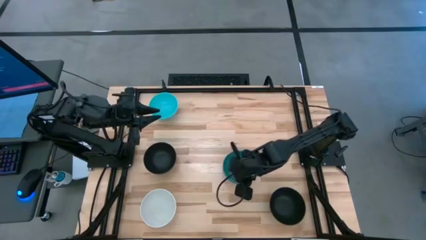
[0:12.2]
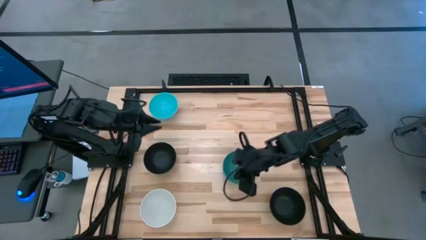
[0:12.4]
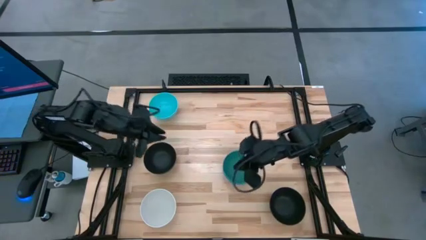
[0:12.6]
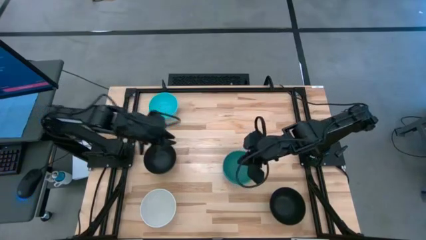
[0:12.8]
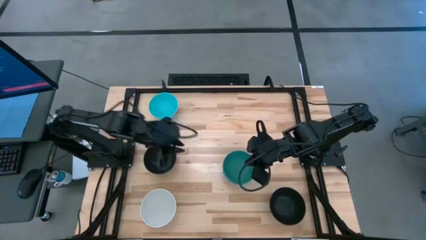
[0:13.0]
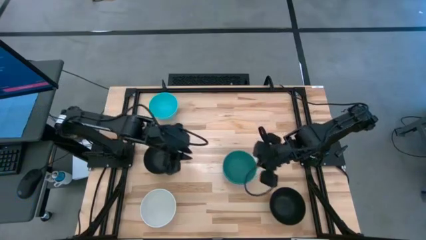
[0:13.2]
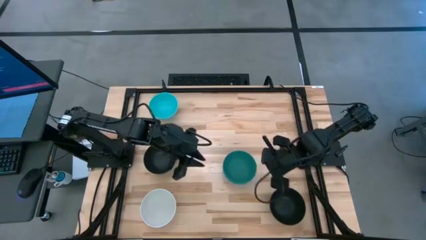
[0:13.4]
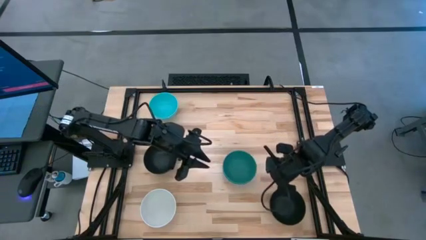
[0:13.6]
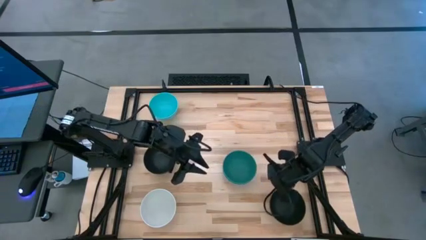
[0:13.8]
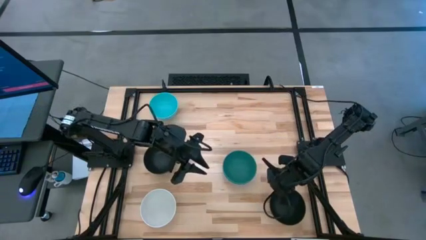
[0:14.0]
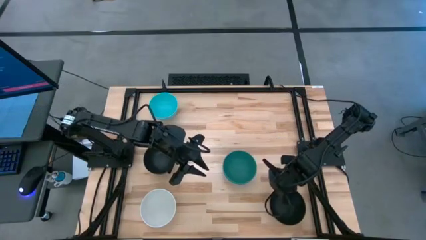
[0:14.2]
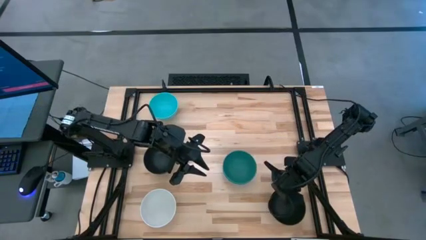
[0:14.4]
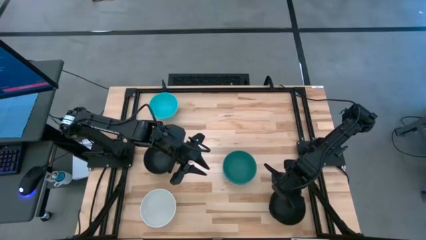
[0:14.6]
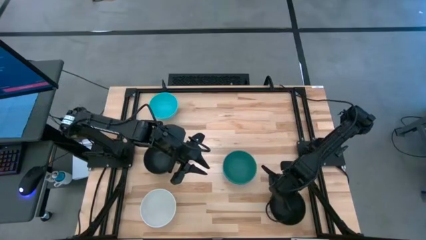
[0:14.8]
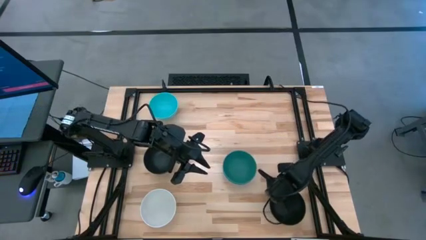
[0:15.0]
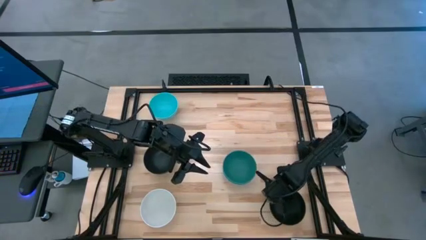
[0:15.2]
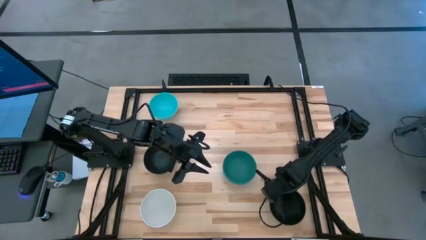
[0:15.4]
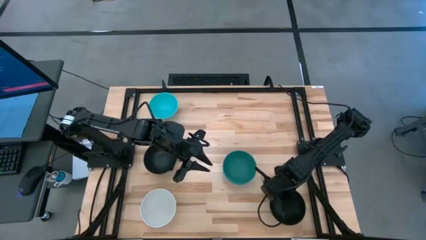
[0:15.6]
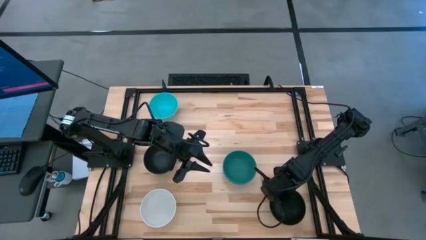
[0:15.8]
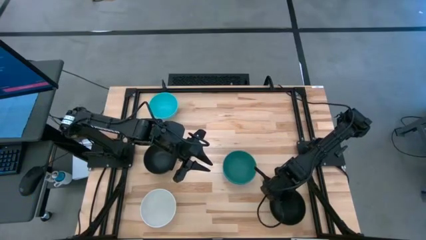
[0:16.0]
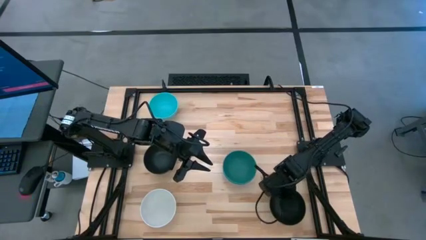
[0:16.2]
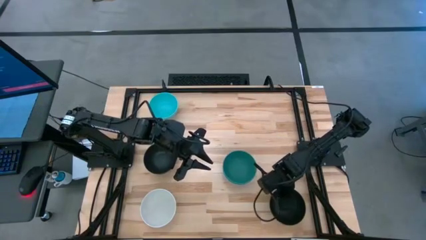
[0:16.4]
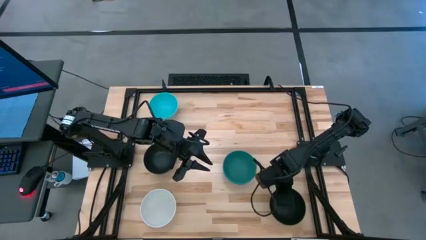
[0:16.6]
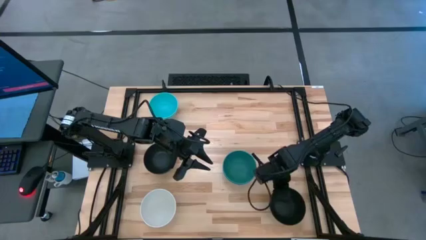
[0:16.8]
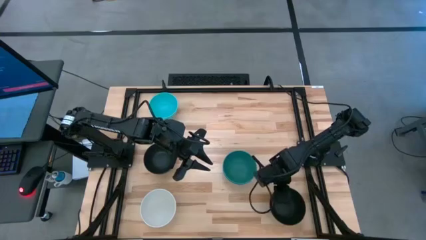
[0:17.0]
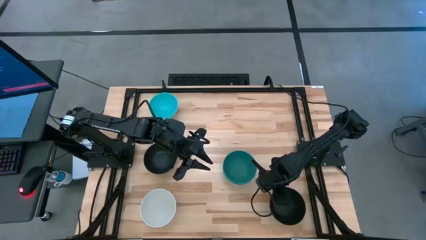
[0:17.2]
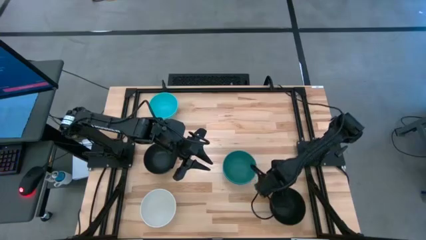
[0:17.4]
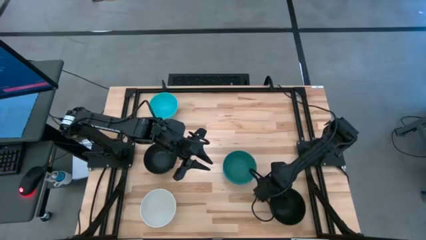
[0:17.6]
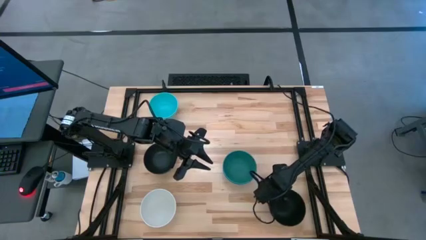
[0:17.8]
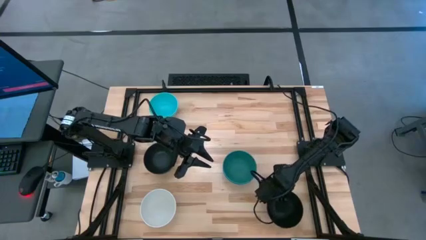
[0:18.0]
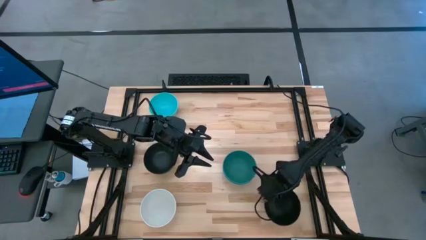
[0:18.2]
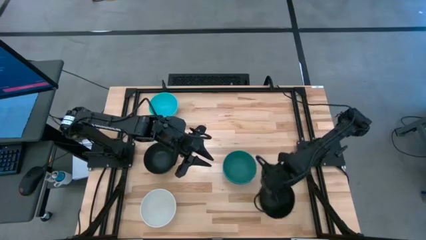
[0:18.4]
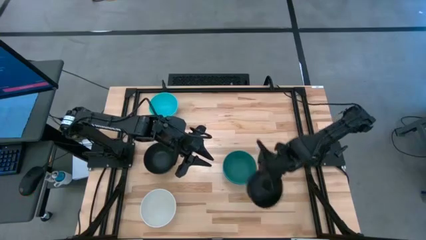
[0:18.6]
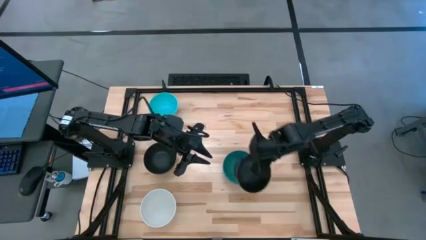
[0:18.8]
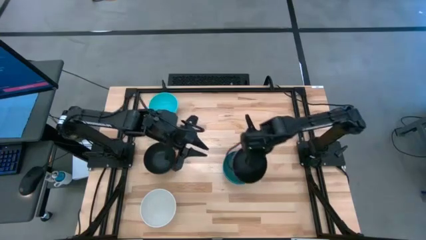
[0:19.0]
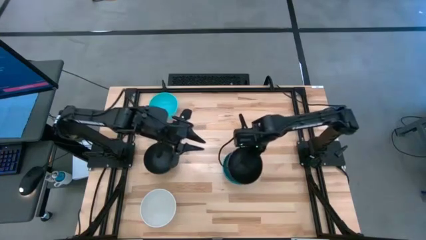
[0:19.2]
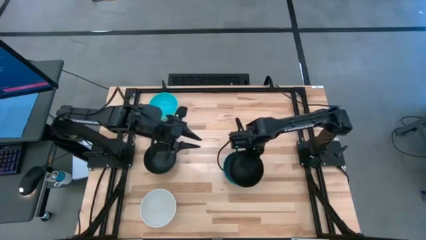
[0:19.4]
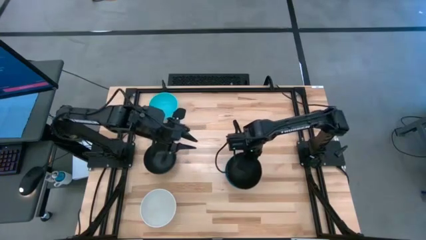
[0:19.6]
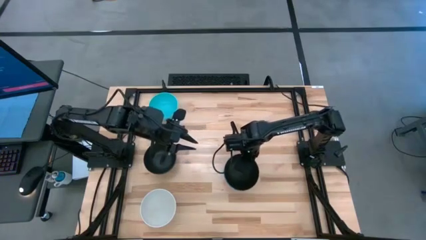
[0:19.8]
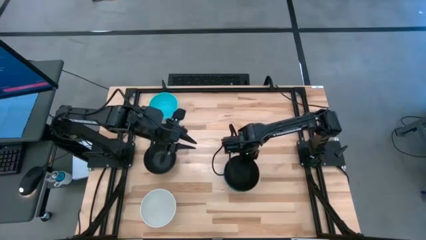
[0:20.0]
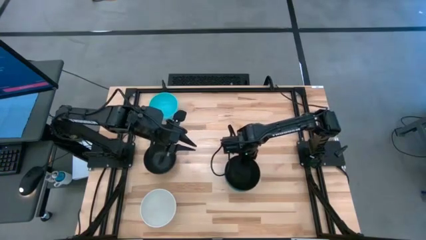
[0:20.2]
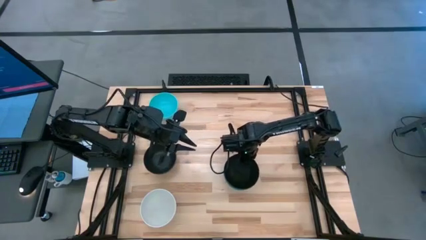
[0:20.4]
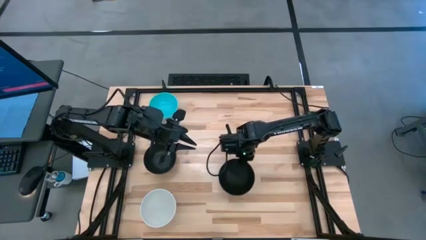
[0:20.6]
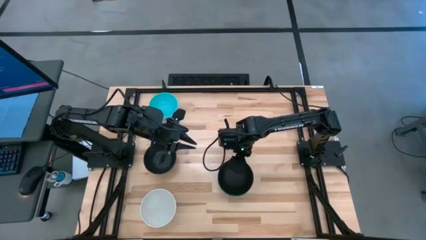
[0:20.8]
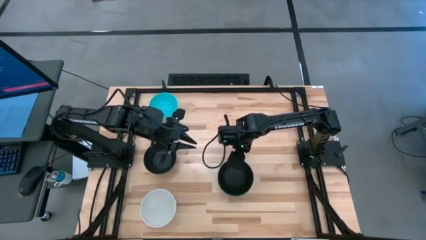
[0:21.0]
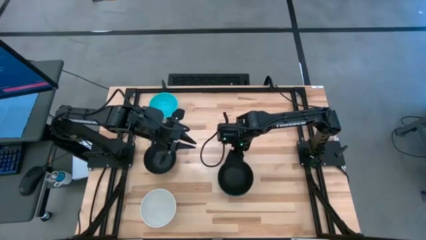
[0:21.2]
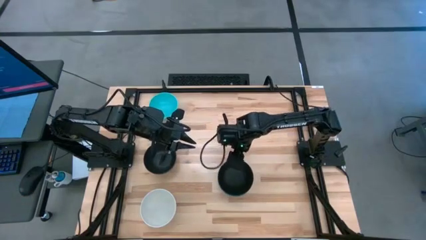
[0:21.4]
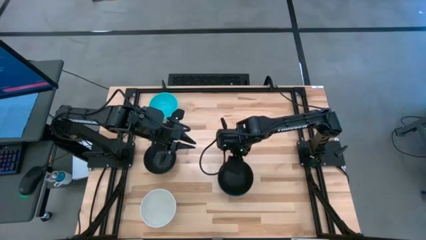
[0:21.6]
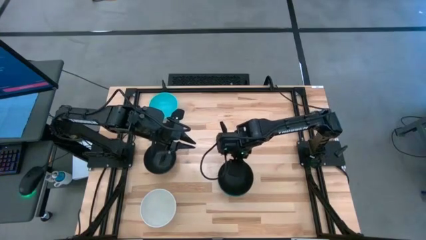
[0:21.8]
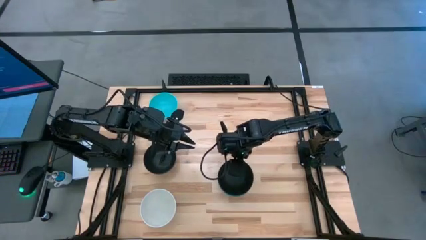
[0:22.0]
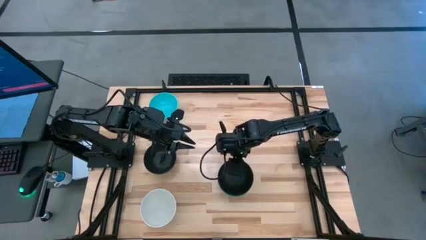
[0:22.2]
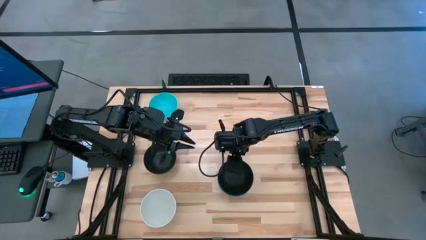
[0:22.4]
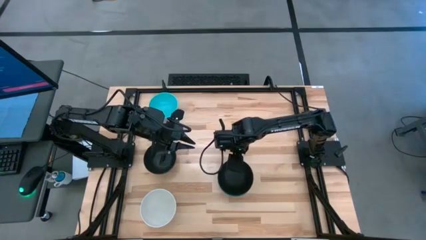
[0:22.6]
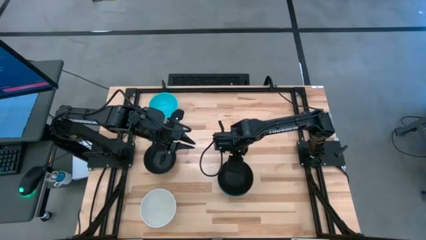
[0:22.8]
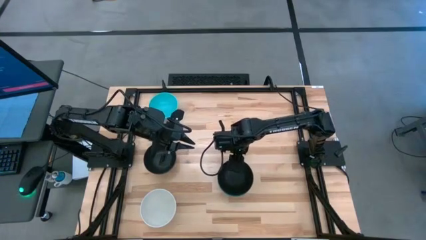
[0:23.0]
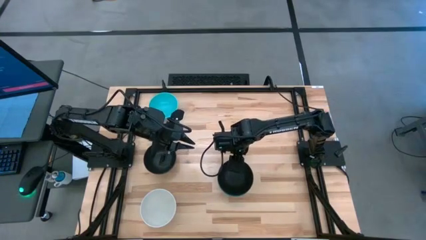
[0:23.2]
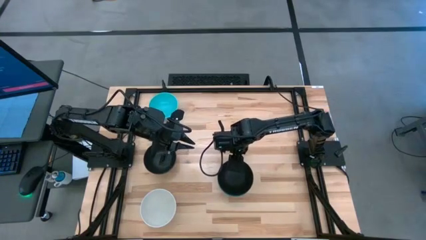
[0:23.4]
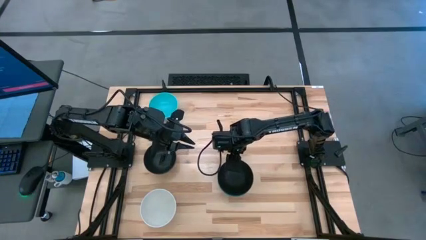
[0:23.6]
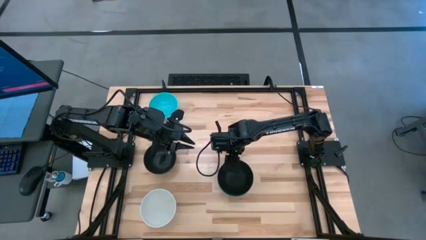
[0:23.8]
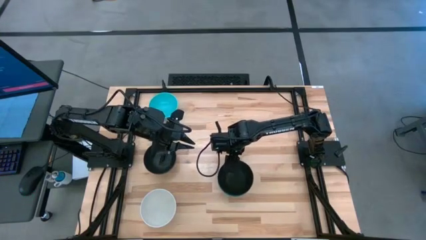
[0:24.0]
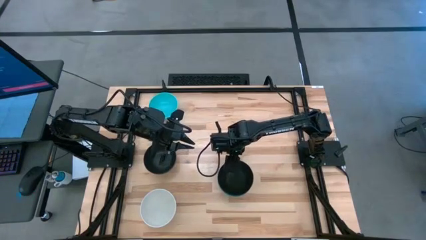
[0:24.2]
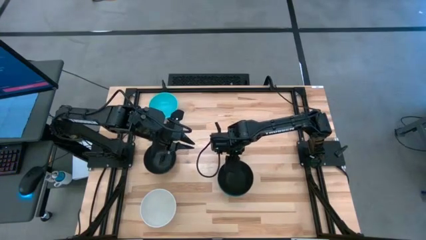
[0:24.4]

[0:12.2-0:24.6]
Task: Nest bowls inside each other
Stack the bottom black bowl on top of the green bowl
